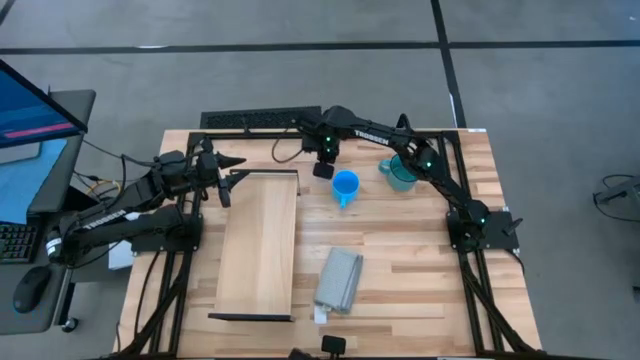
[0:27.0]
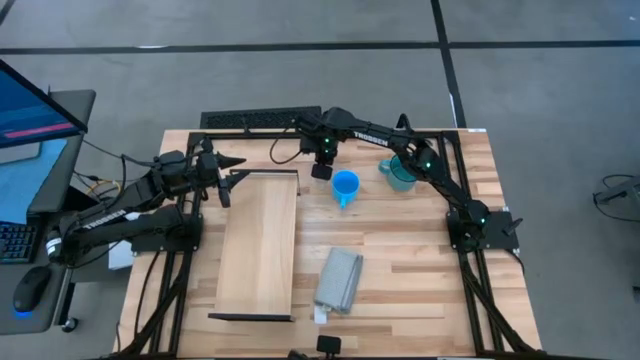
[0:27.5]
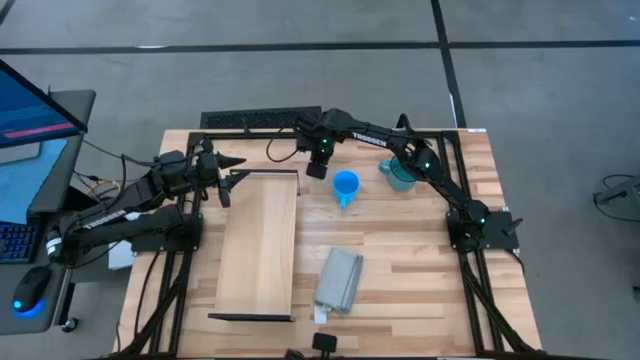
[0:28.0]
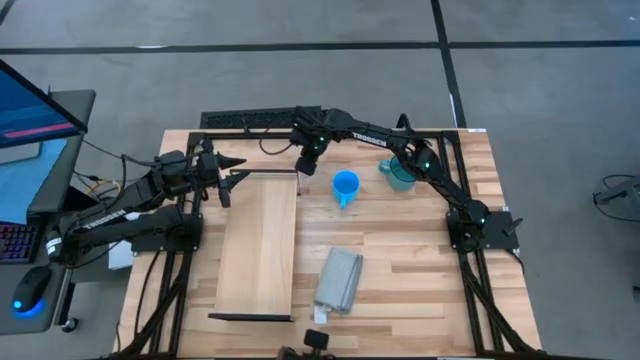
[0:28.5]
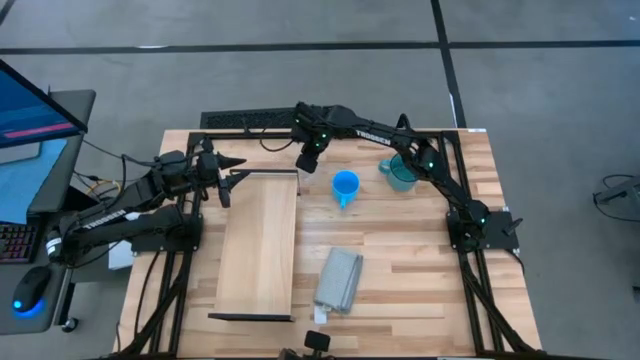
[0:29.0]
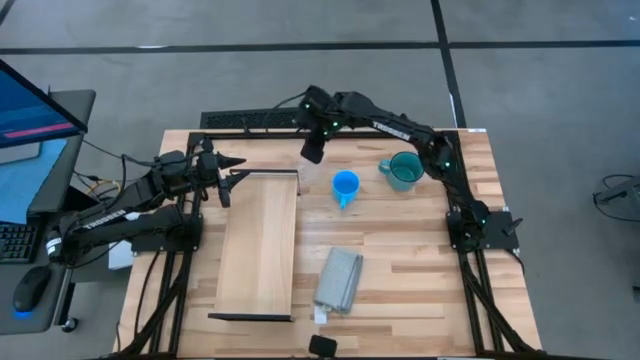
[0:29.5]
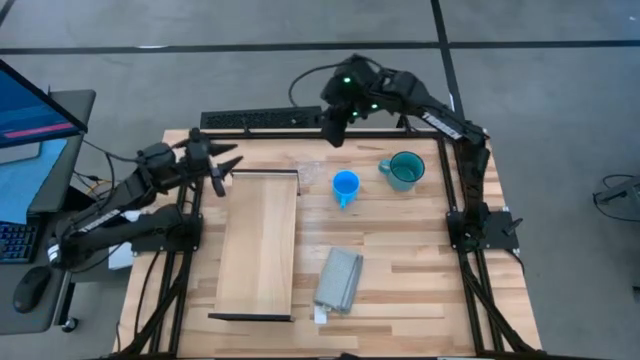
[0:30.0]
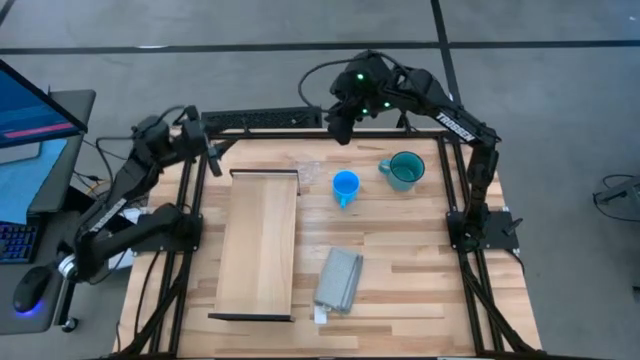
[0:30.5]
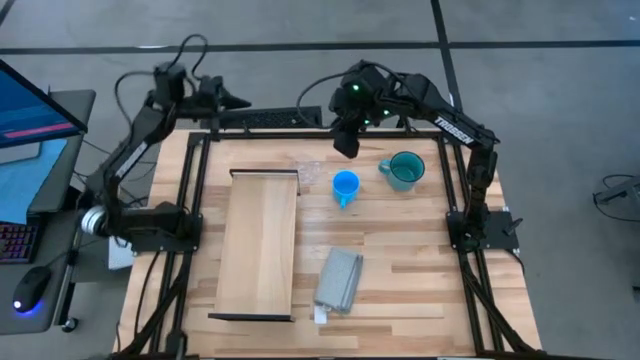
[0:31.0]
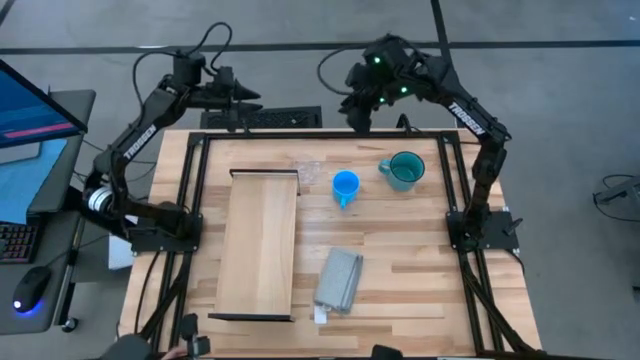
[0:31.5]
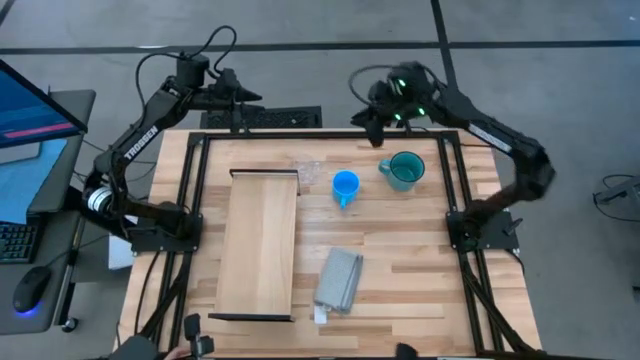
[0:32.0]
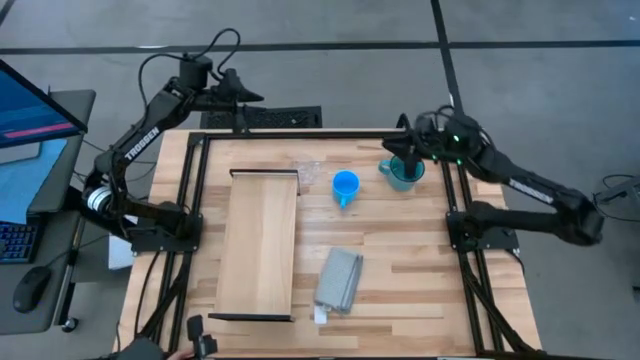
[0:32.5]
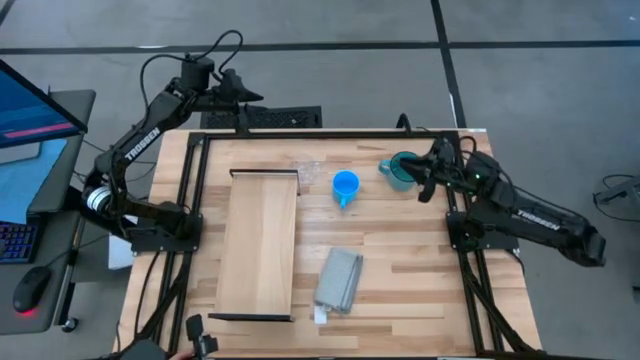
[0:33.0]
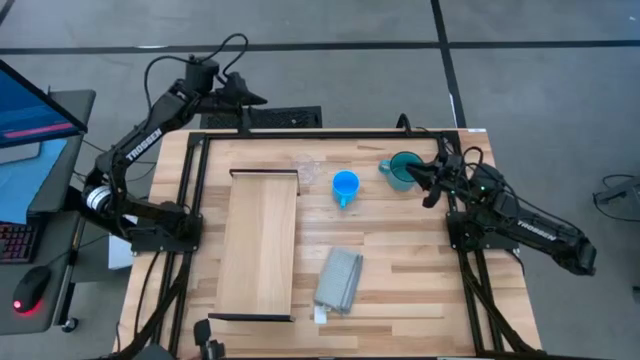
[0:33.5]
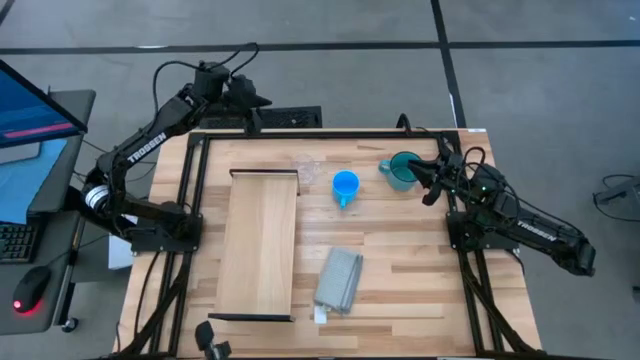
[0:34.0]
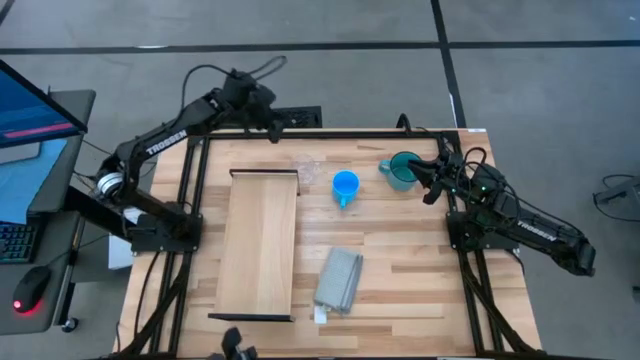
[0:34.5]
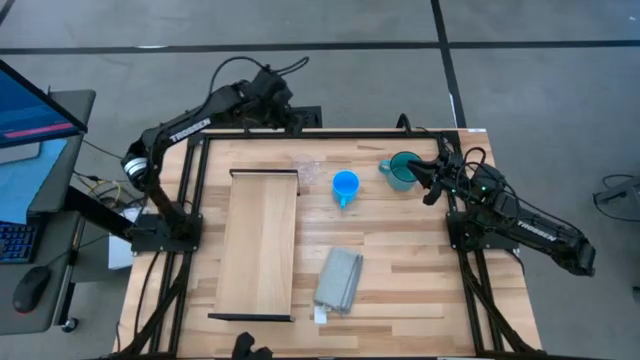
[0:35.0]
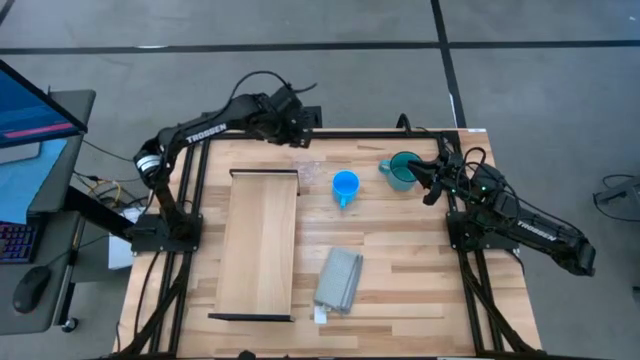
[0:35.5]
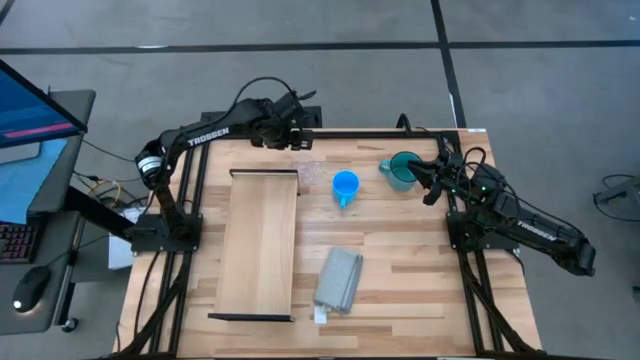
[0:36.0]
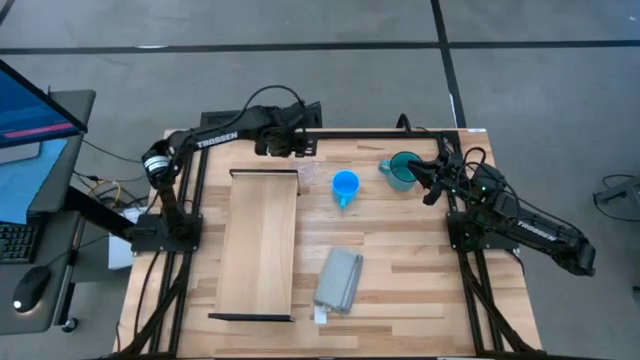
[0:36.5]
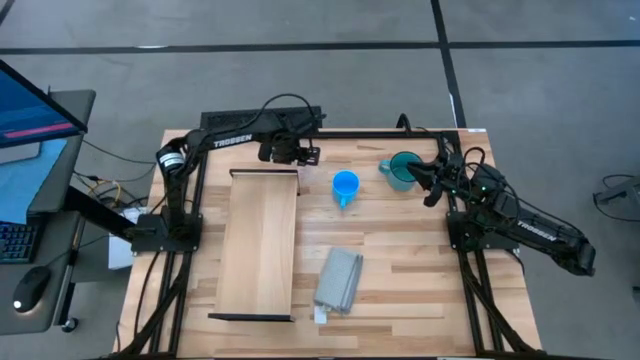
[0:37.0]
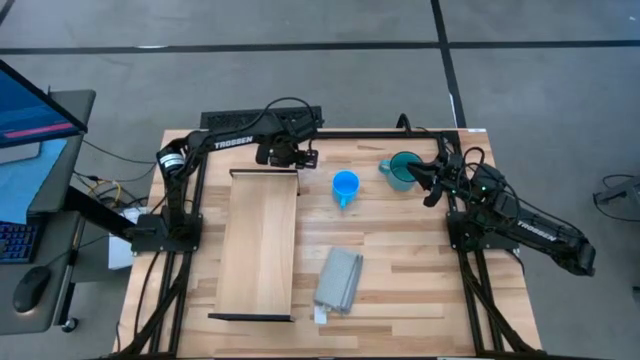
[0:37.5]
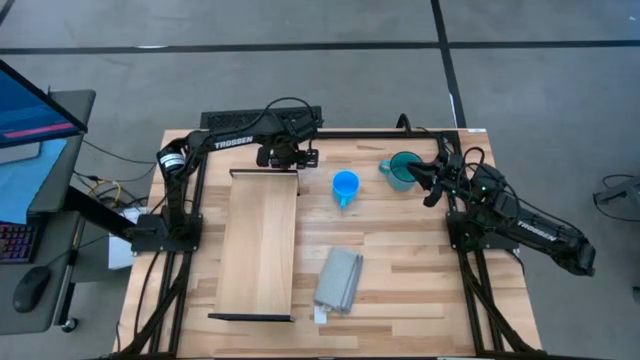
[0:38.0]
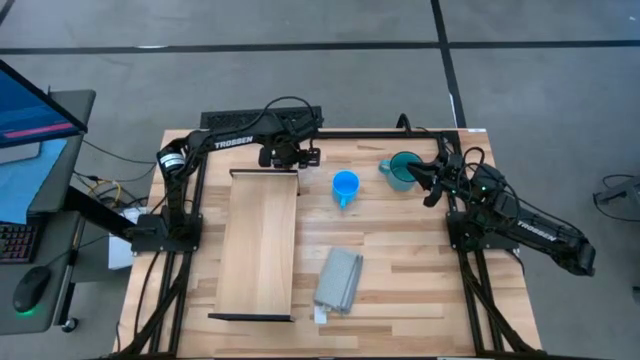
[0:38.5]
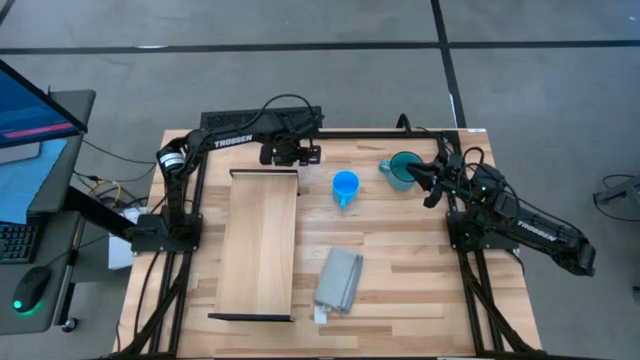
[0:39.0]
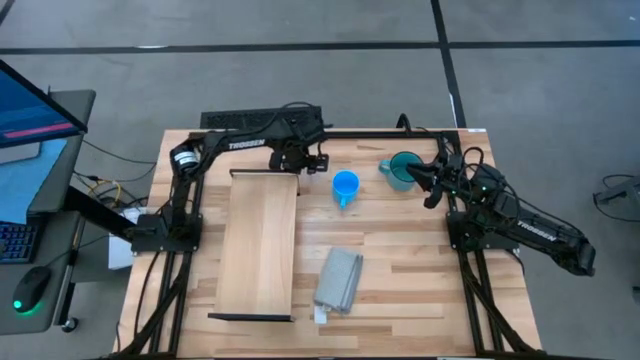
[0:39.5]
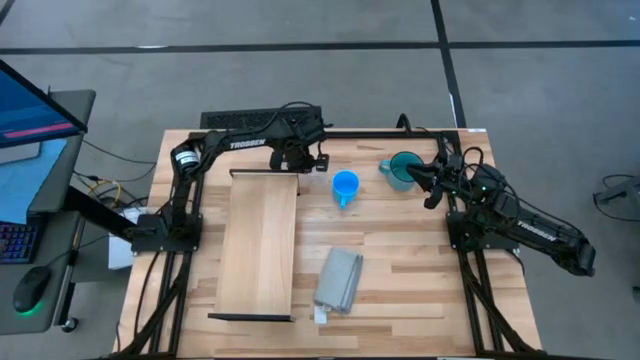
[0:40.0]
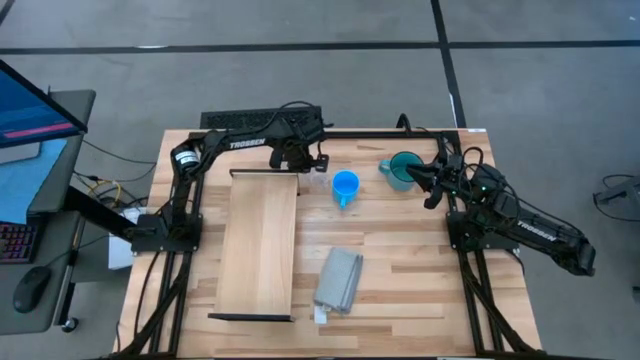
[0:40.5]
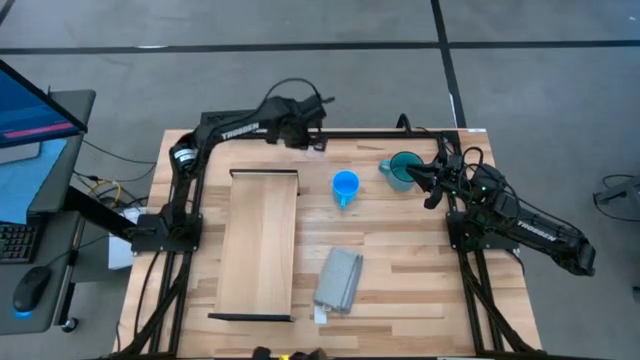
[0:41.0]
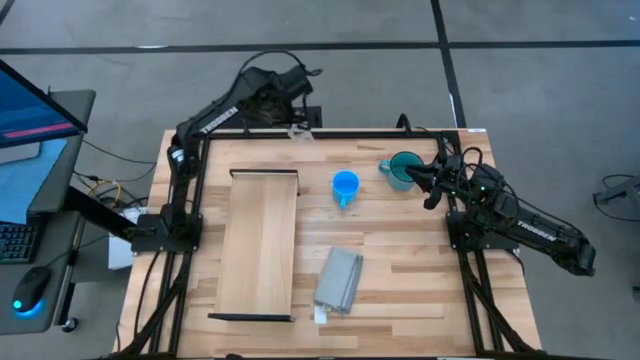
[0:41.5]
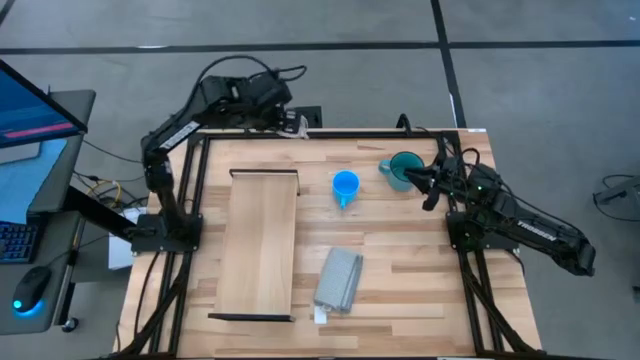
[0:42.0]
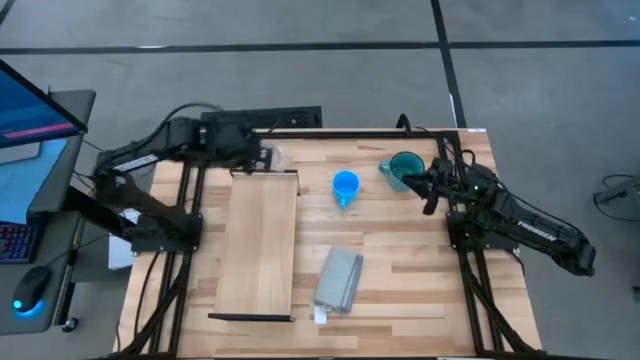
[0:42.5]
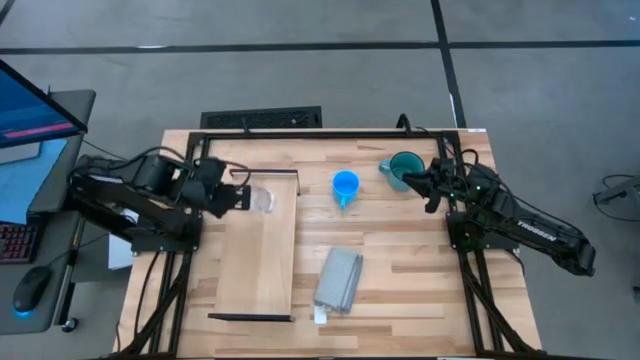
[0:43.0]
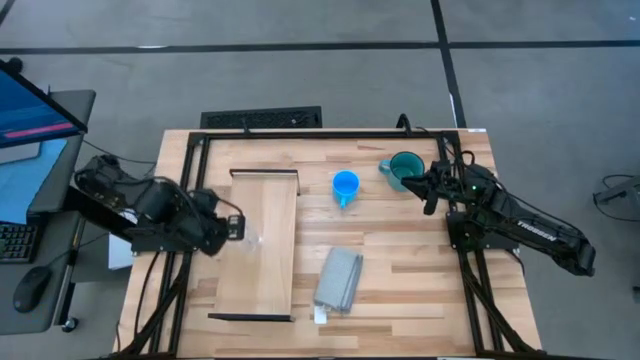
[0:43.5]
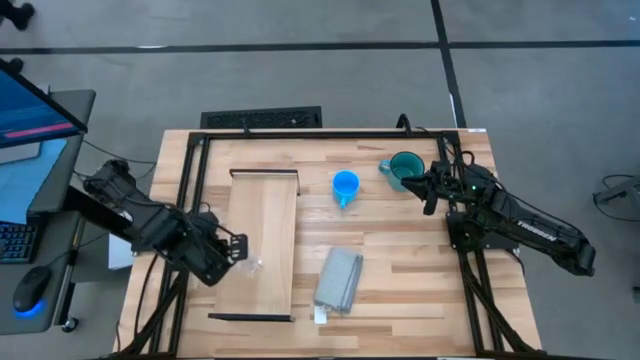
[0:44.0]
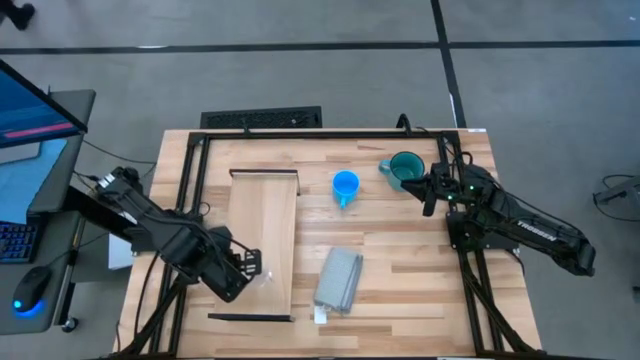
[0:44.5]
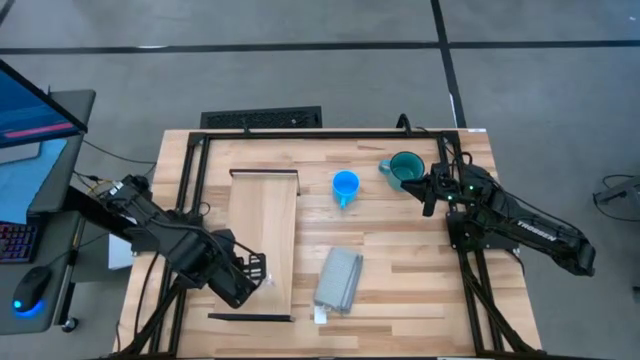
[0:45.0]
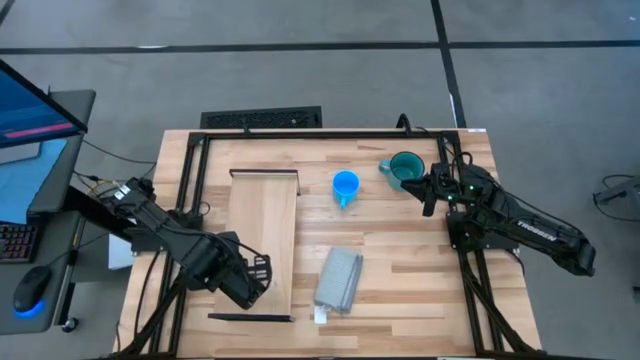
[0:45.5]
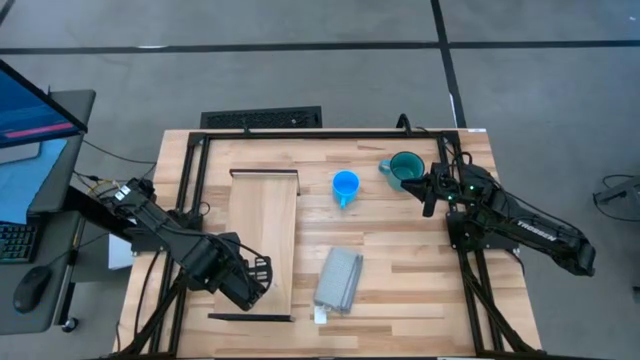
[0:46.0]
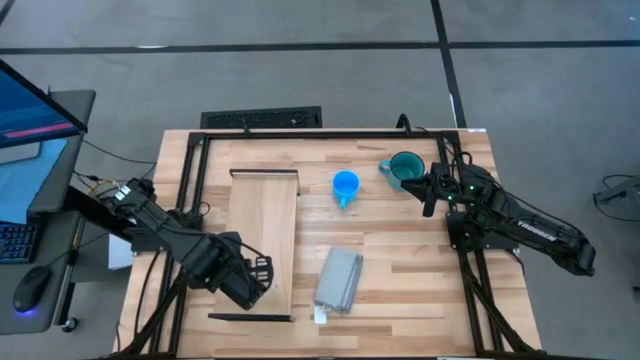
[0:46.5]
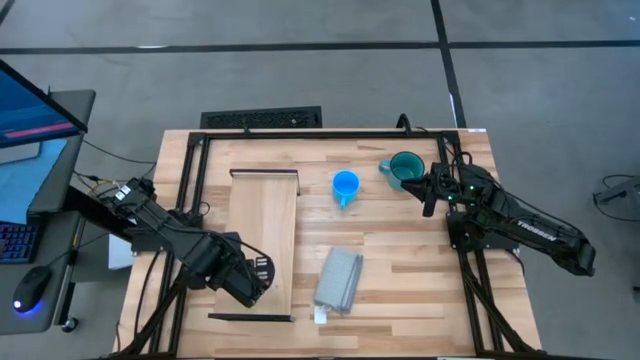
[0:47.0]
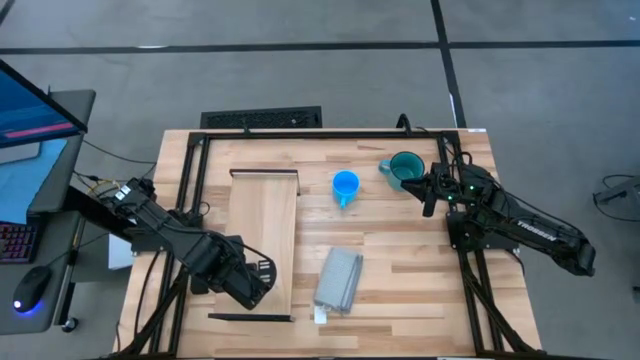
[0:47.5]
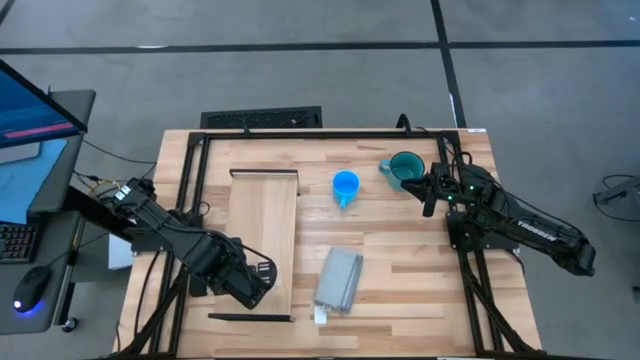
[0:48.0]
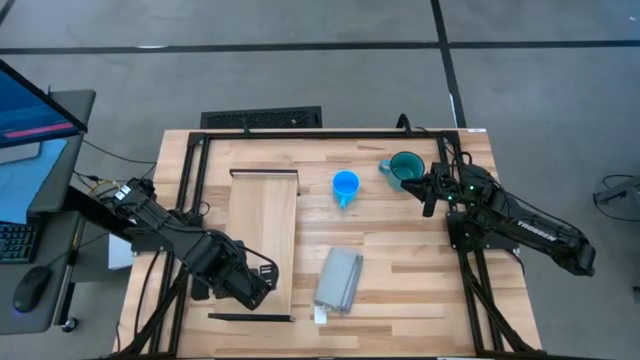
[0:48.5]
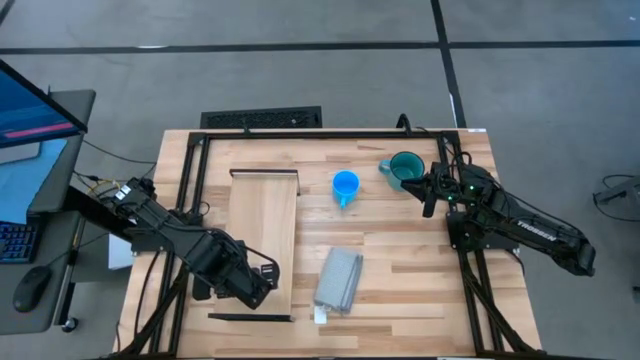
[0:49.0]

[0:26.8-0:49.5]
Task: Stack small to large cups/mugs on shelf
Put the transparent mug on the shelf
